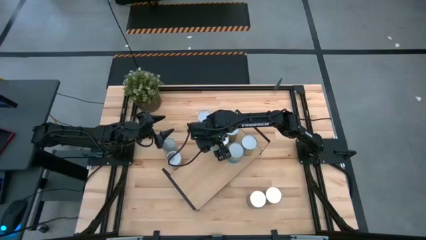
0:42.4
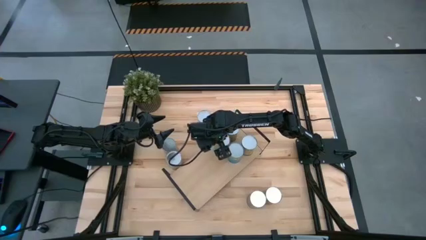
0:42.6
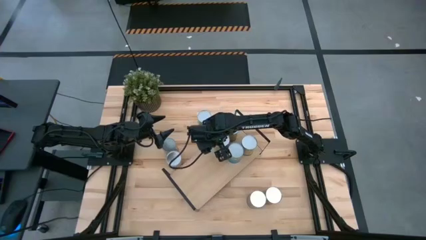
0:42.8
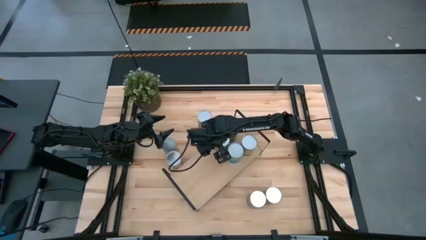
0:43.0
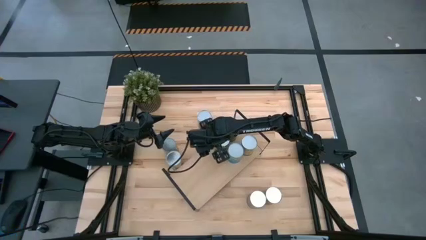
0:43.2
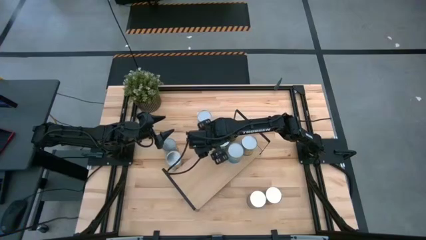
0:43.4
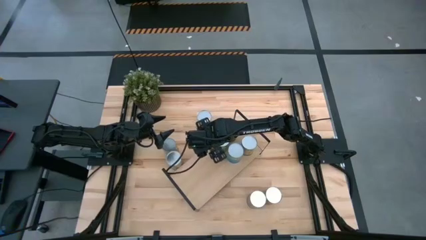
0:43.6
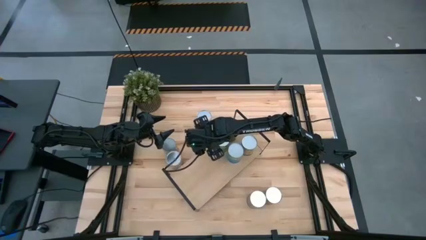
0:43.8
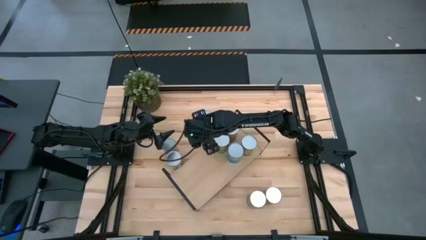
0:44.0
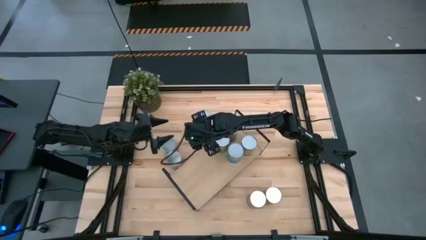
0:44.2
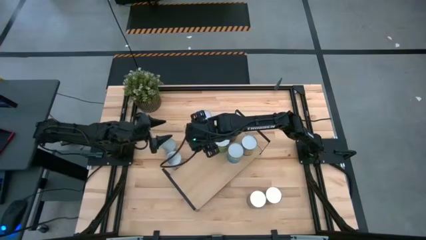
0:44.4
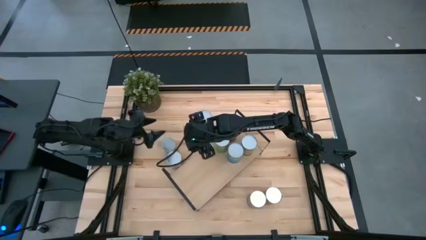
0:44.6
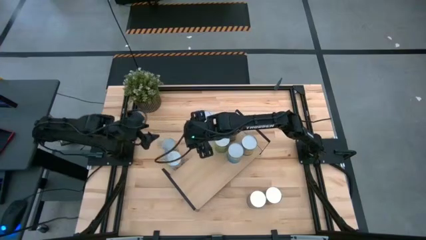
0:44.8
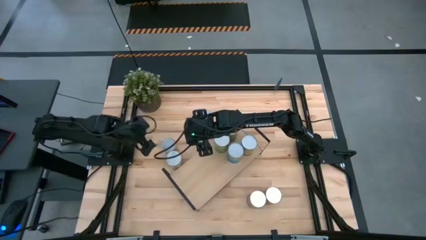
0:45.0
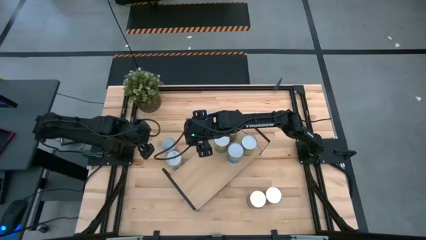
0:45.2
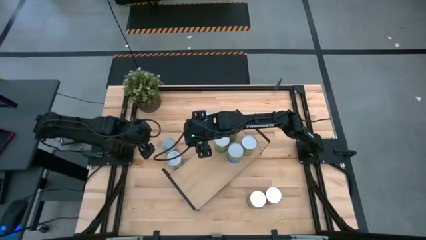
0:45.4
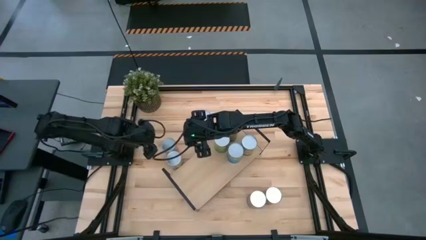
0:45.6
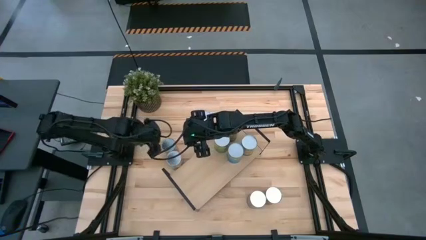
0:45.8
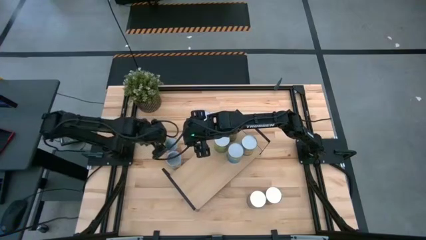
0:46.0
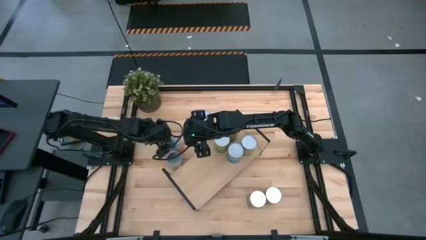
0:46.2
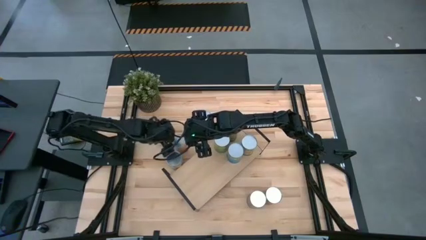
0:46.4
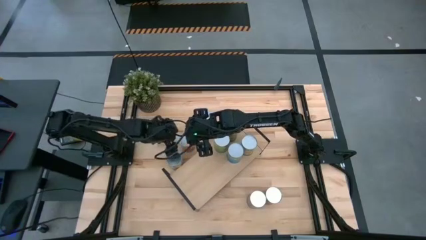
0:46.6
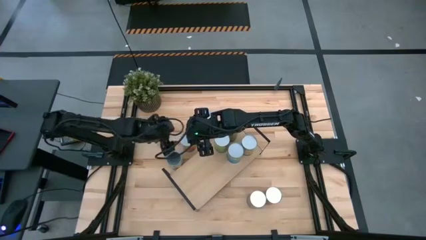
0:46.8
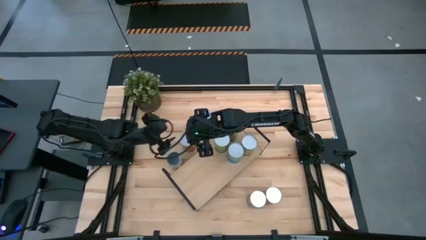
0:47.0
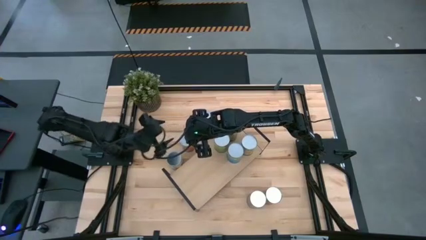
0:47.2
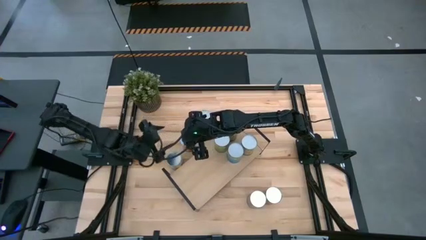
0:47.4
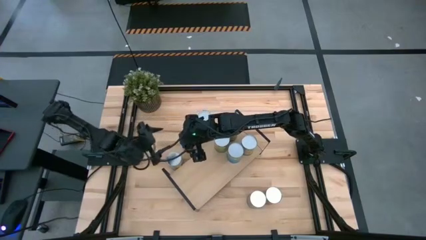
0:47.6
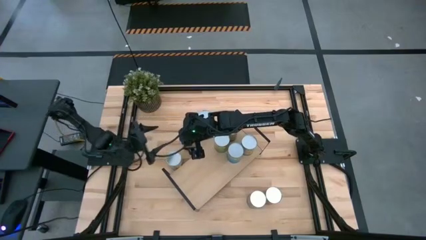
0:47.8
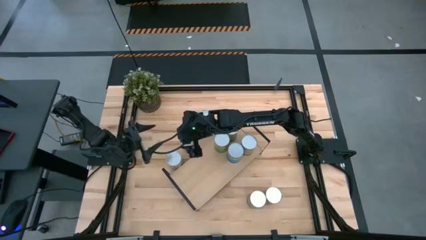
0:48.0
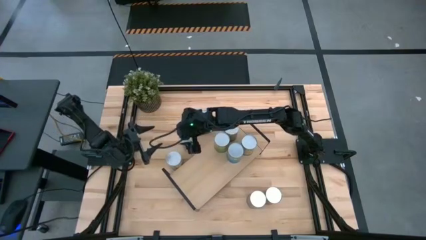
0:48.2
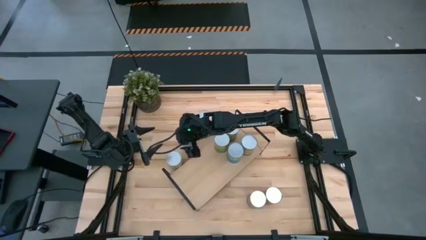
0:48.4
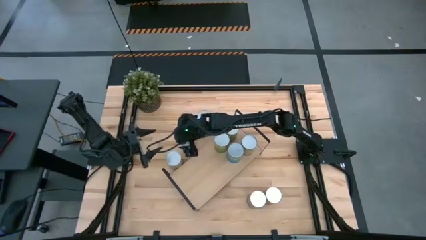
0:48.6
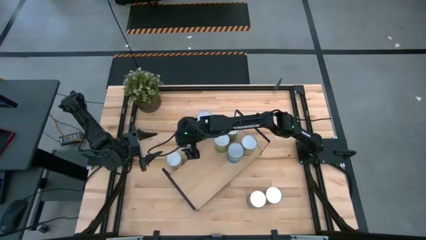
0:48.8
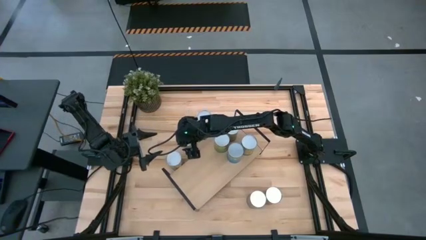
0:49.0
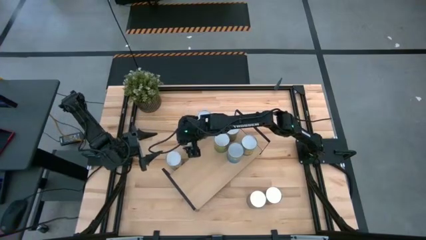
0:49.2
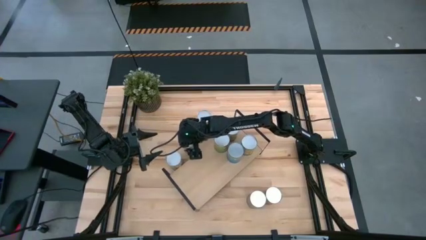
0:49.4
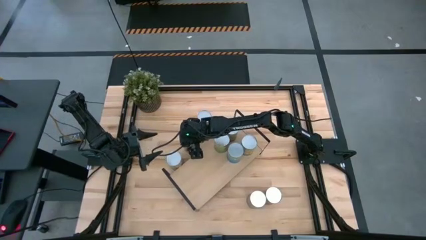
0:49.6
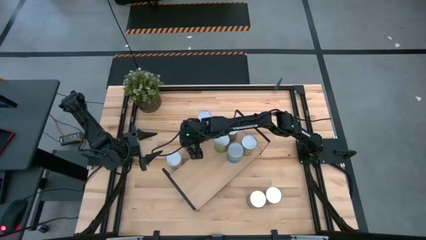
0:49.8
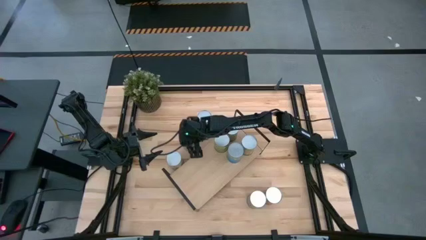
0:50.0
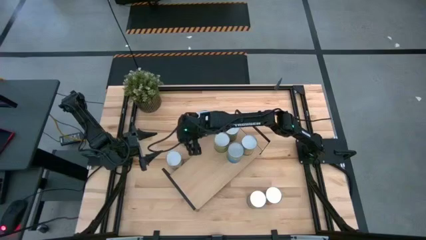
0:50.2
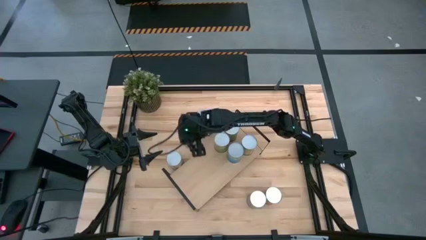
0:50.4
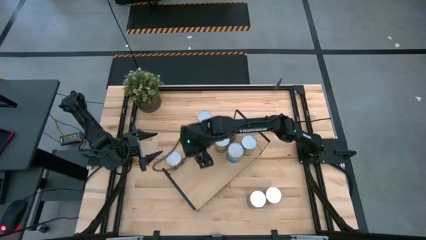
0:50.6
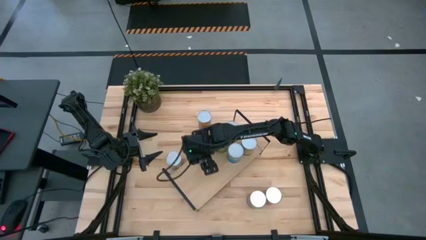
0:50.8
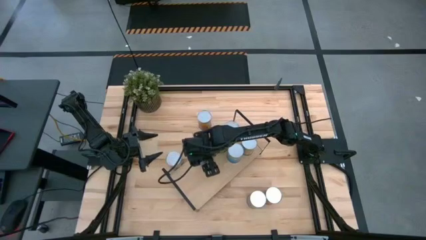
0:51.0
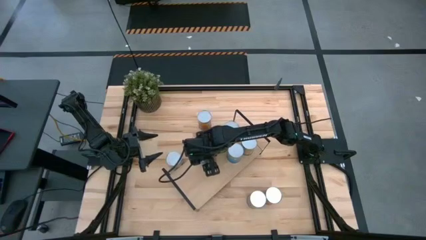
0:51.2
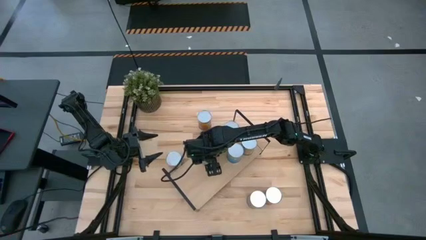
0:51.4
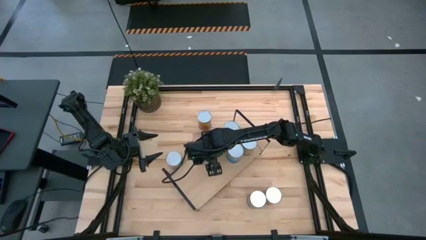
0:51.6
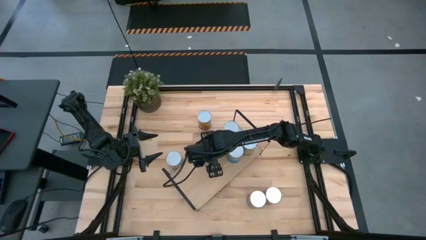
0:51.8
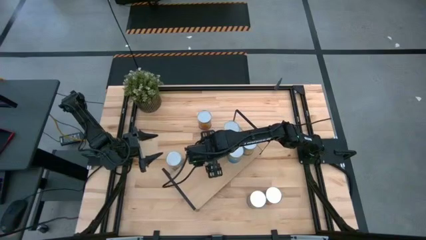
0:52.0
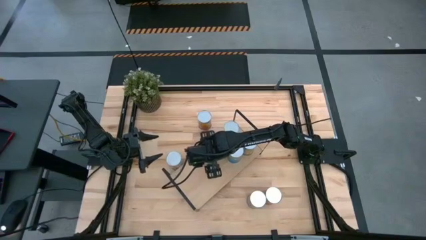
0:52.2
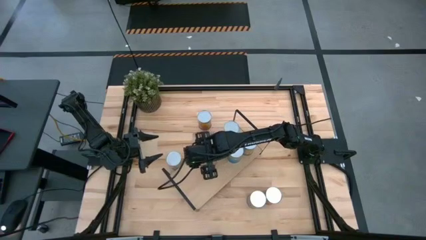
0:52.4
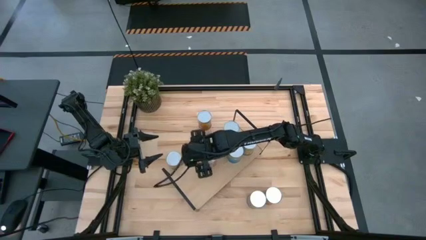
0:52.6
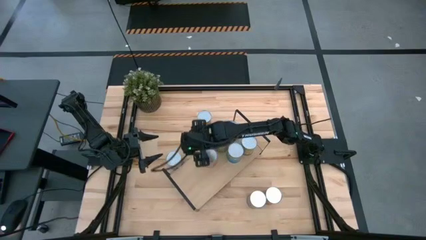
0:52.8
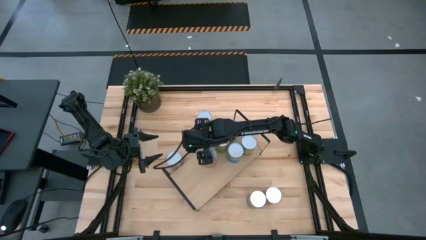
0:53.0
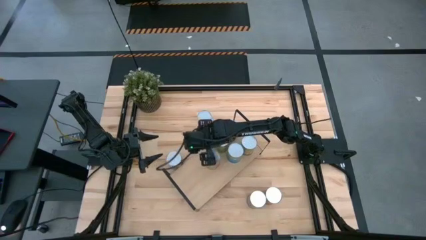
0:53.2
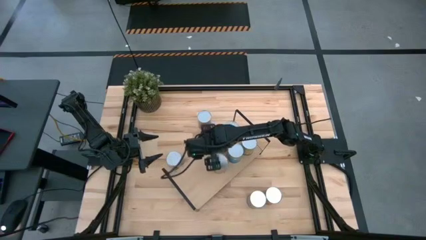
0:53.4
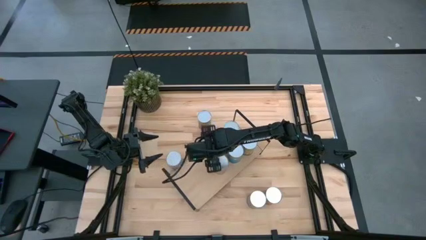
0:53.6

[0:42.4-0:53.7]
Task: Pick and place cans onto a shelf
Put the canned pineapple on the shelf

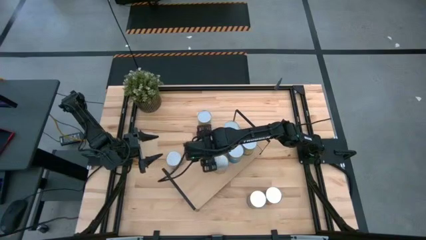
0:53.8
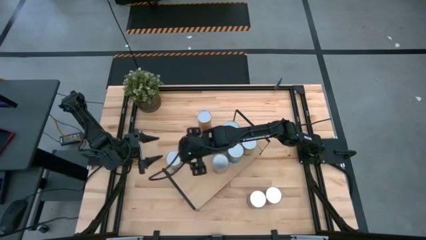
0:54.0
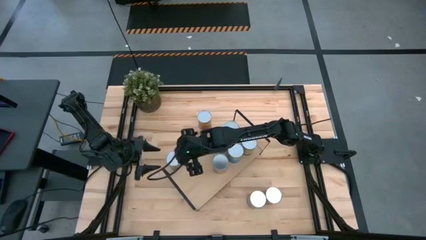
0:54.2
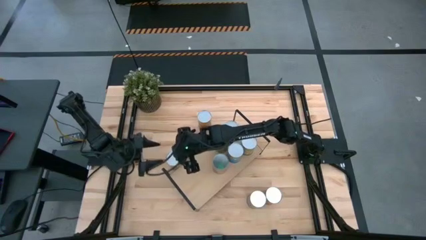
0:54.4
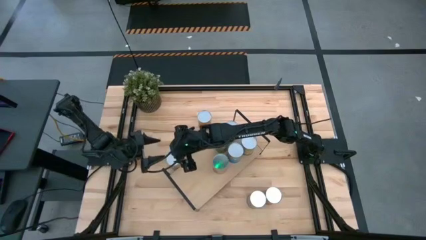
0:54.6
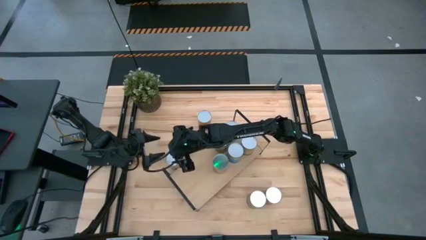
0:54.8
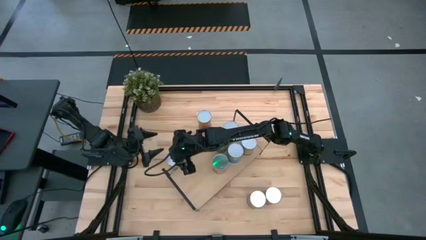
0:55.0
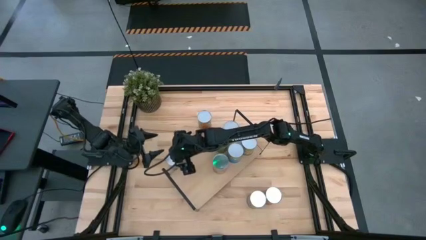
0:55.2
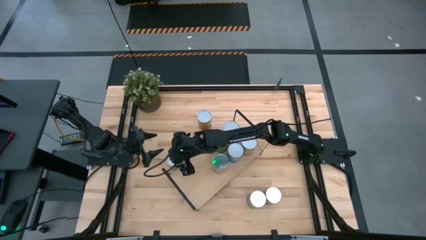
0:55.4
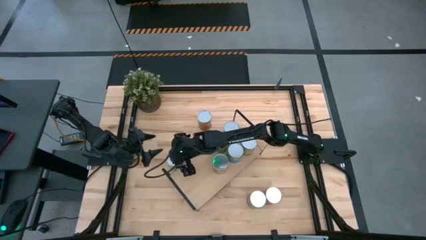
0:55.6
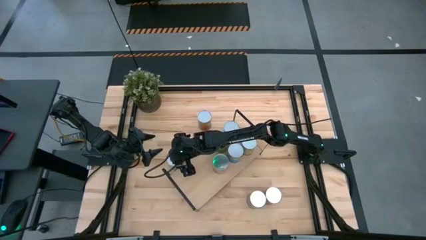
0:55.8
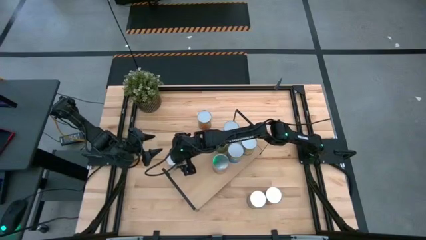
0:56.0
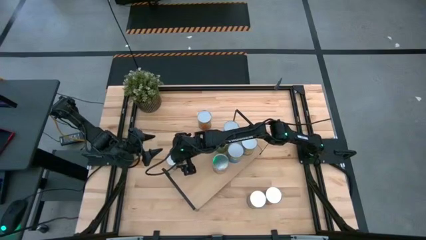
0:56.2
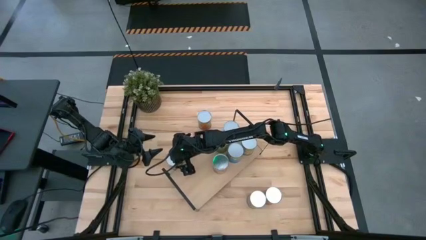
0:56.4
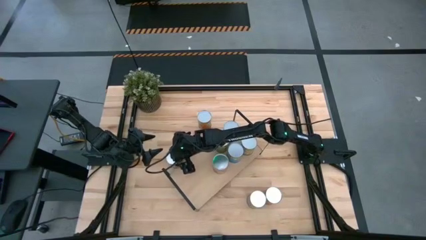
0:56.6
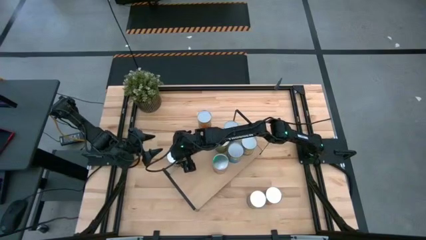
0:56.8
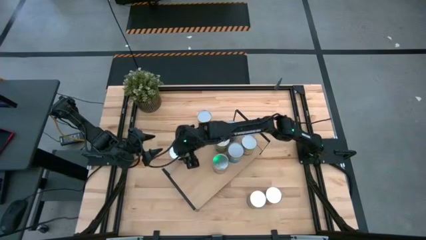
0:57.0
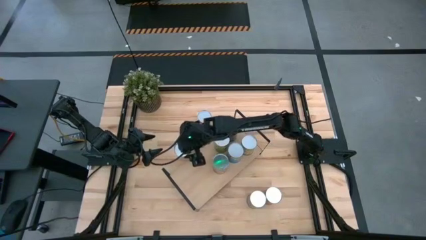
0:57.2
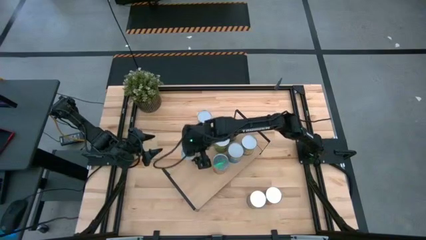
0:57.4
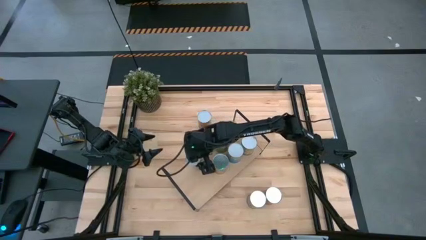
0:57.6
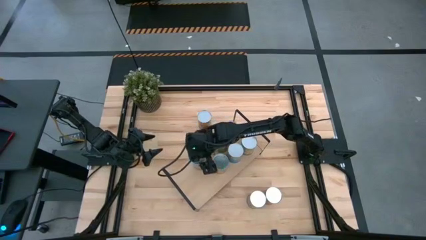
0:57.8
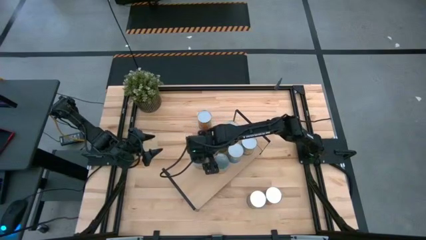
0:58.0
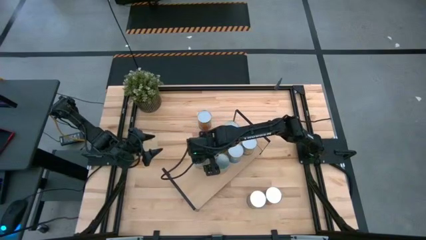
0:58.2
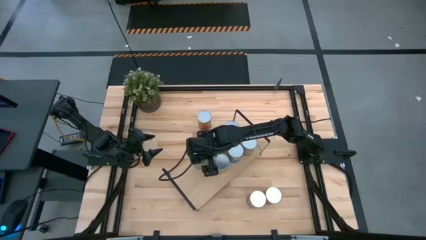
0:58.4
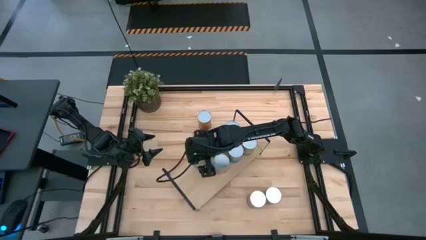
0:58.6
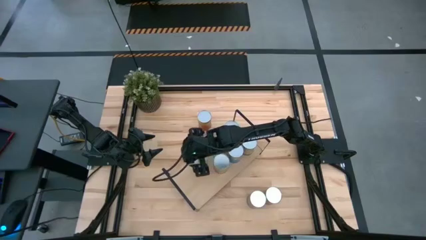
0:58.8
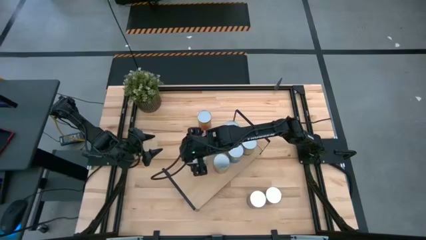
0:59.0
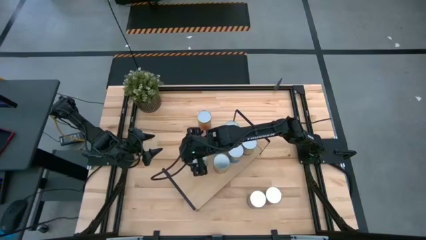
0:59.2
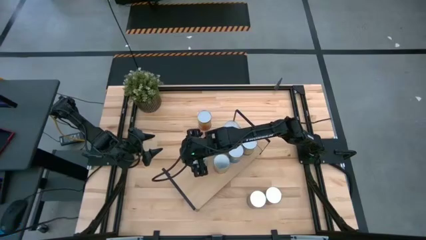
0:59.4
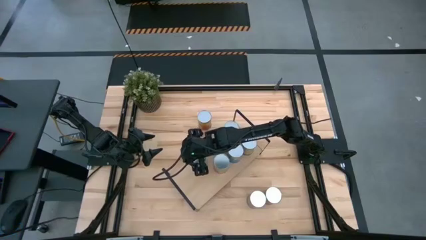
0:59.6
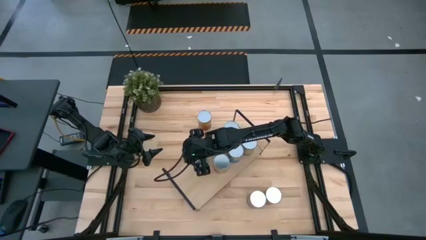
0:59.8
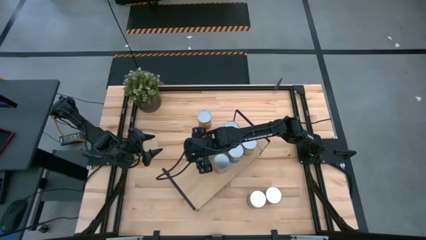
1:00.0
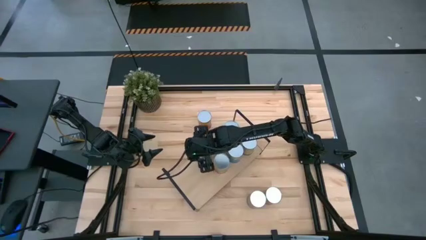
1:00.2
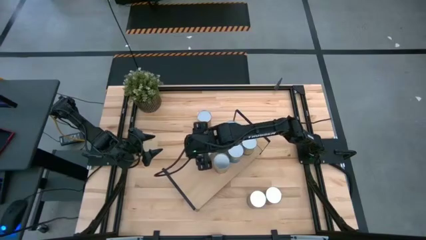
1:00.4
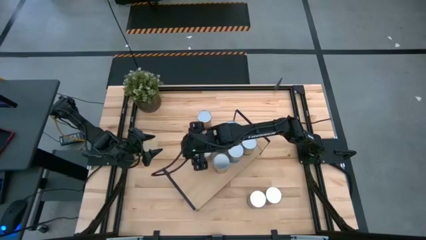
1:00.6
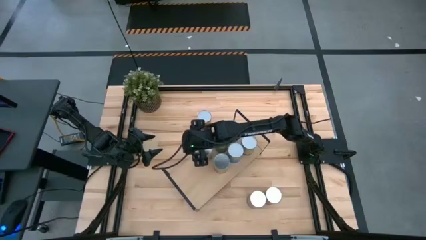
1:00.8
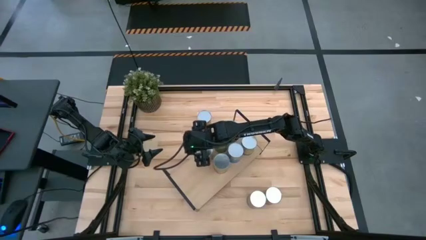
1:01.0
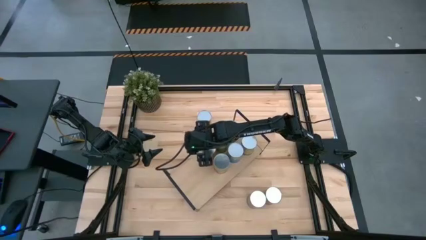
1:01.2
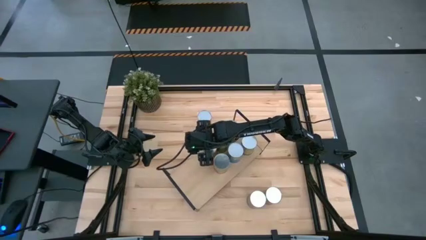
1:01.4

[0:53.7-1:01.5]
Put the canned peaches on the shelf
